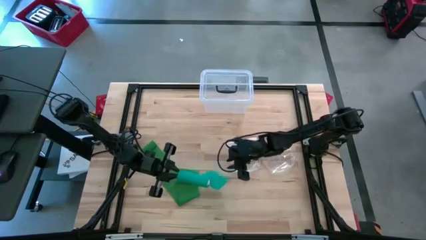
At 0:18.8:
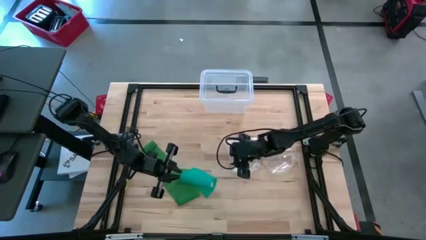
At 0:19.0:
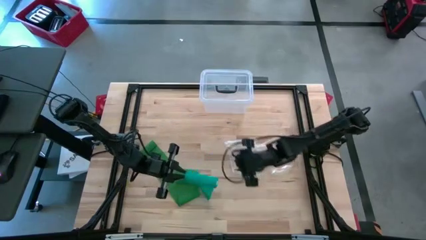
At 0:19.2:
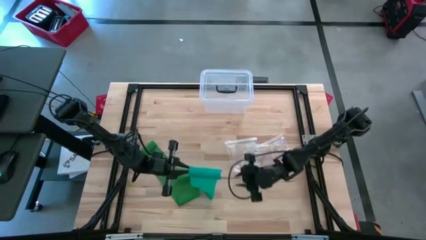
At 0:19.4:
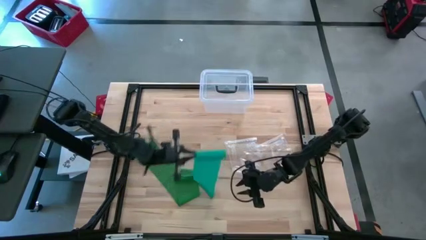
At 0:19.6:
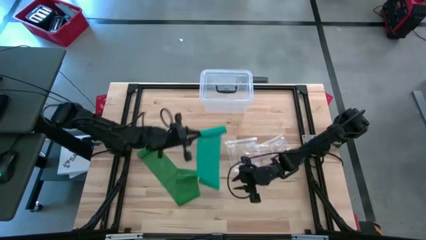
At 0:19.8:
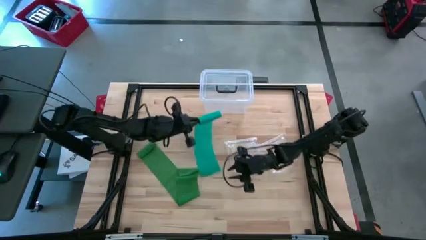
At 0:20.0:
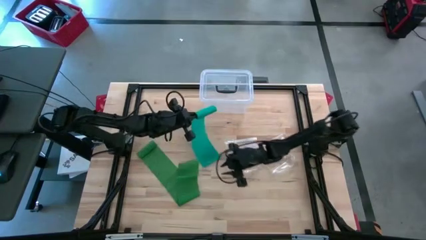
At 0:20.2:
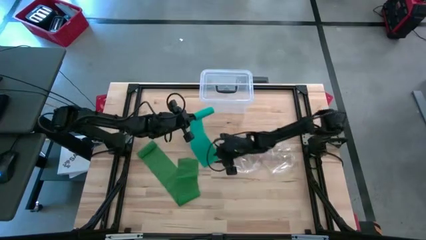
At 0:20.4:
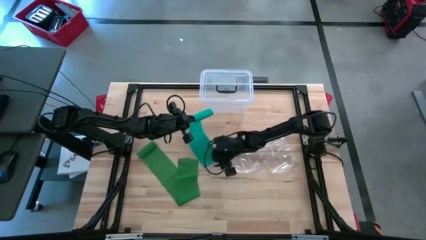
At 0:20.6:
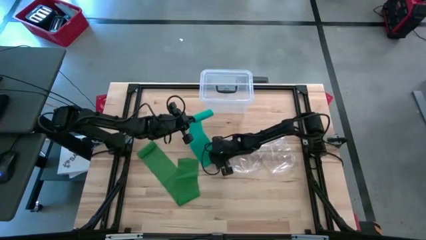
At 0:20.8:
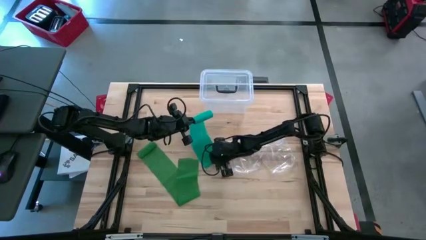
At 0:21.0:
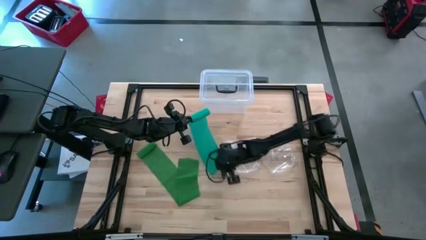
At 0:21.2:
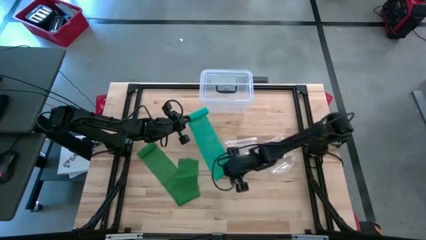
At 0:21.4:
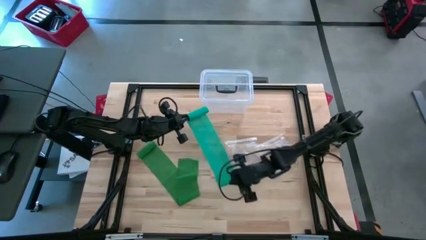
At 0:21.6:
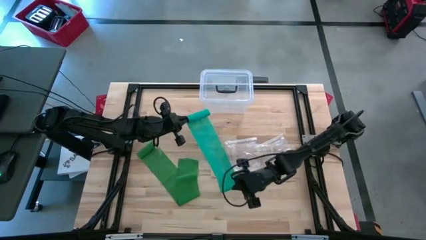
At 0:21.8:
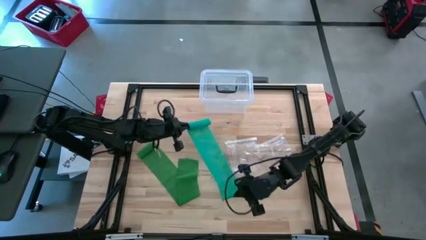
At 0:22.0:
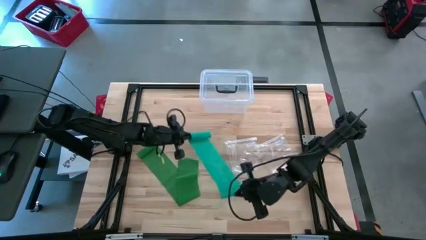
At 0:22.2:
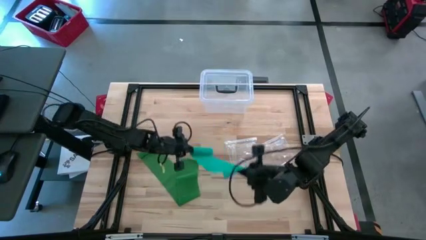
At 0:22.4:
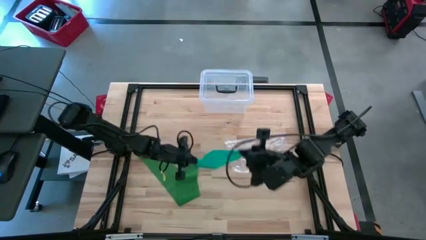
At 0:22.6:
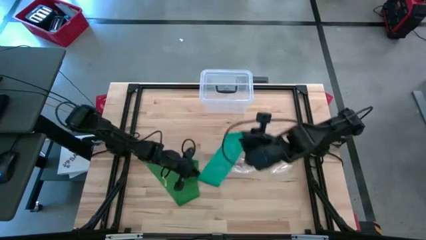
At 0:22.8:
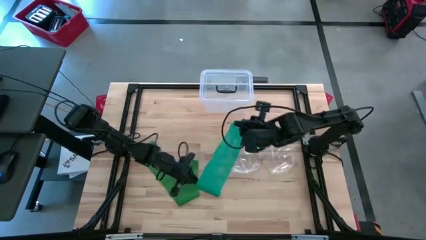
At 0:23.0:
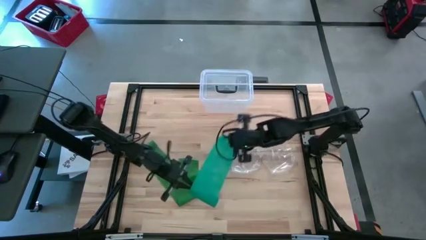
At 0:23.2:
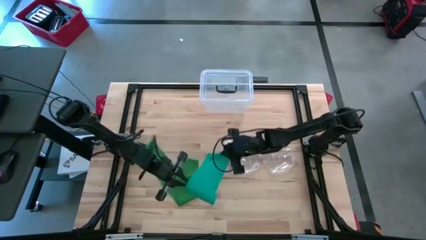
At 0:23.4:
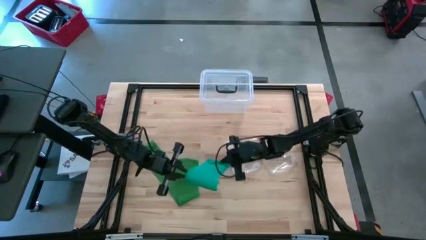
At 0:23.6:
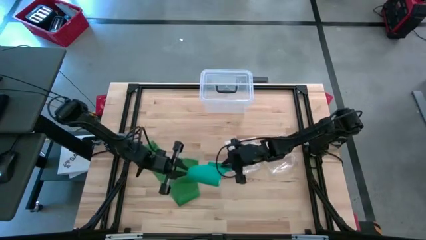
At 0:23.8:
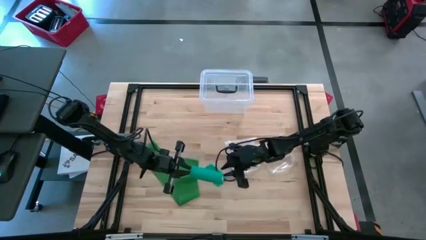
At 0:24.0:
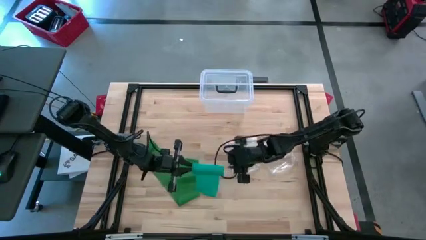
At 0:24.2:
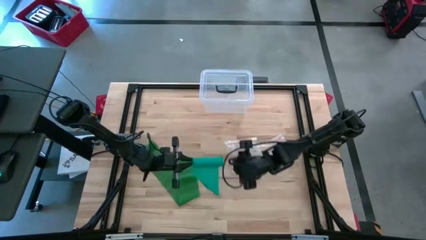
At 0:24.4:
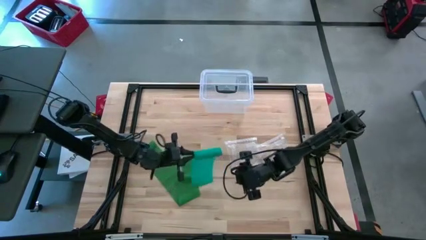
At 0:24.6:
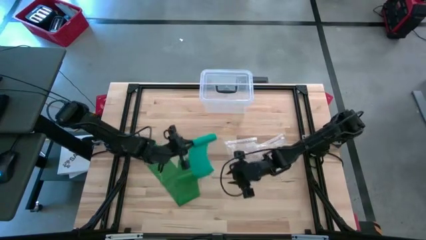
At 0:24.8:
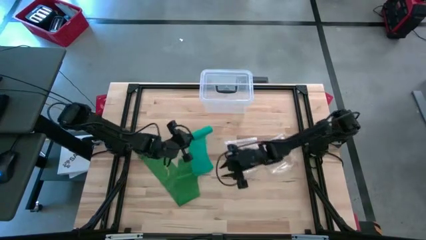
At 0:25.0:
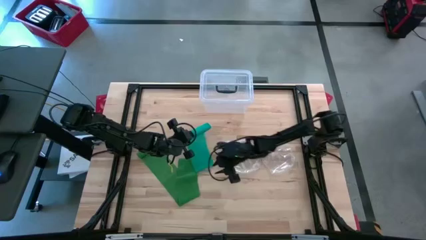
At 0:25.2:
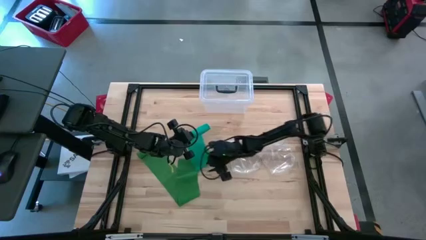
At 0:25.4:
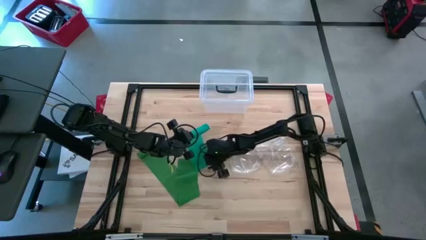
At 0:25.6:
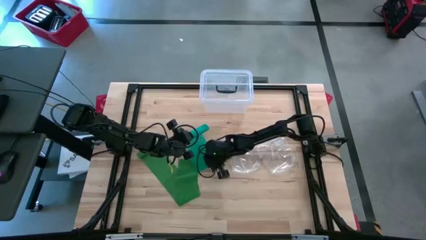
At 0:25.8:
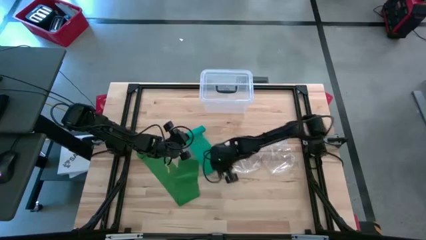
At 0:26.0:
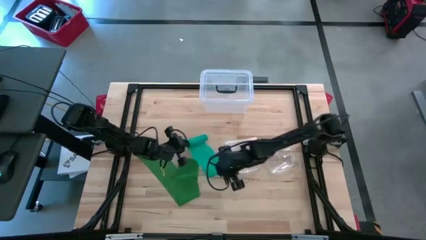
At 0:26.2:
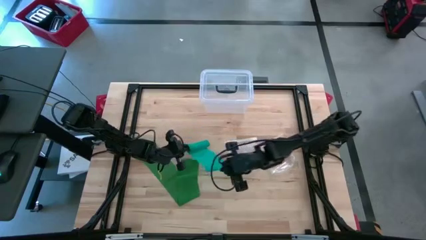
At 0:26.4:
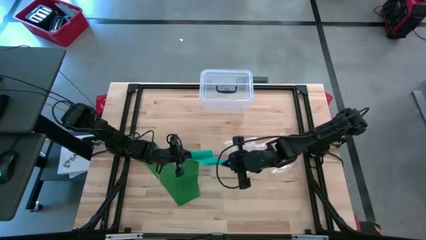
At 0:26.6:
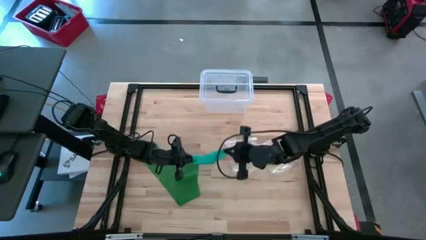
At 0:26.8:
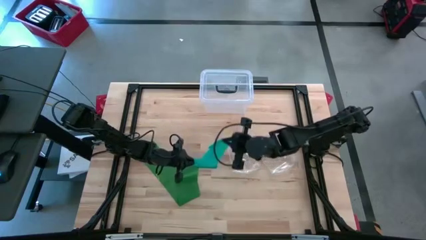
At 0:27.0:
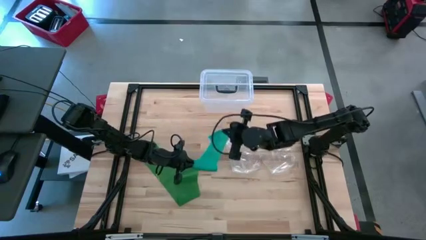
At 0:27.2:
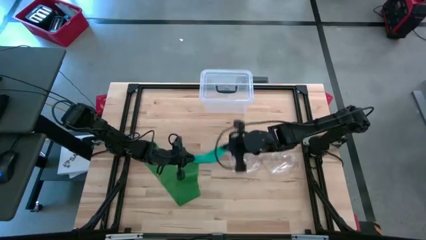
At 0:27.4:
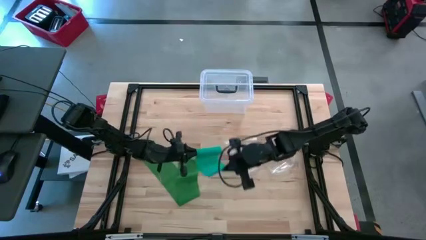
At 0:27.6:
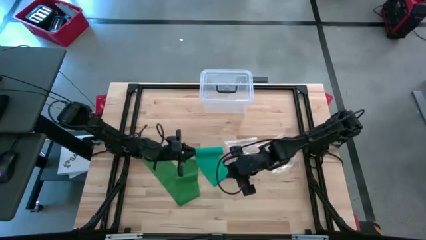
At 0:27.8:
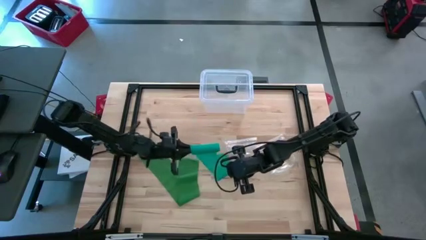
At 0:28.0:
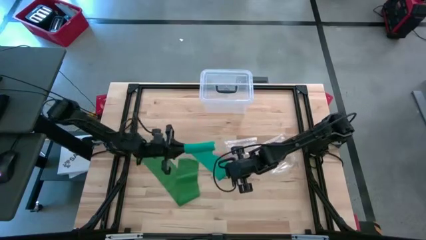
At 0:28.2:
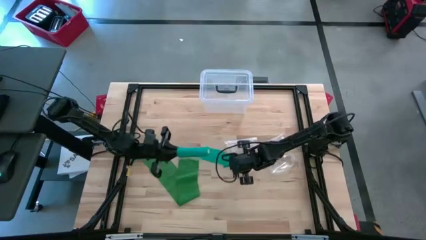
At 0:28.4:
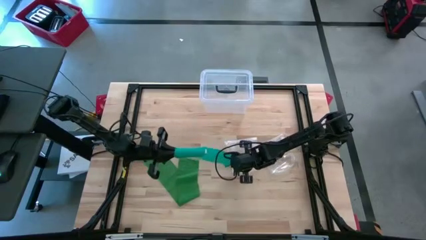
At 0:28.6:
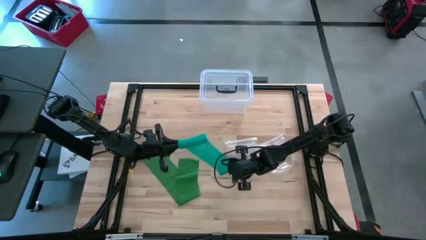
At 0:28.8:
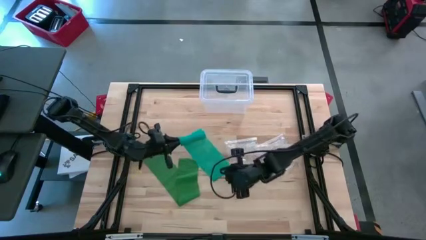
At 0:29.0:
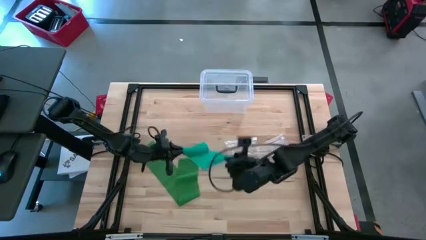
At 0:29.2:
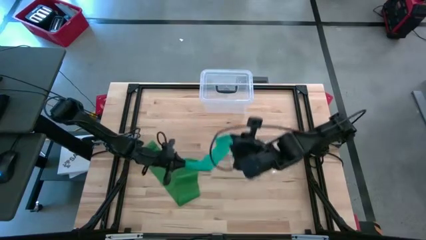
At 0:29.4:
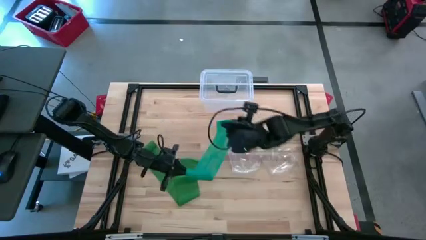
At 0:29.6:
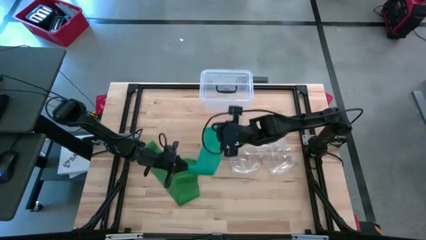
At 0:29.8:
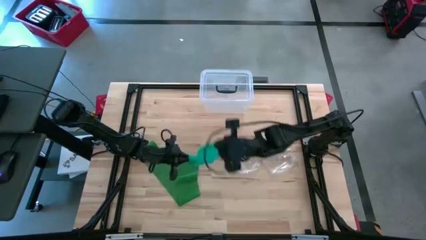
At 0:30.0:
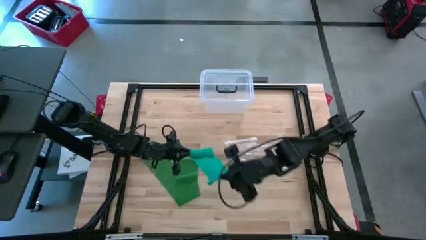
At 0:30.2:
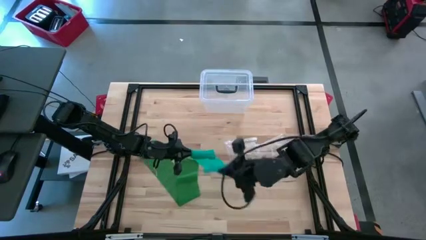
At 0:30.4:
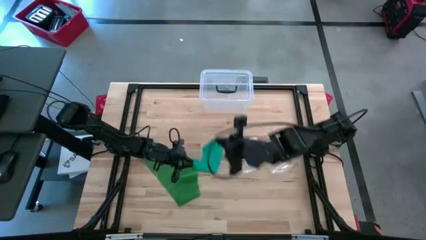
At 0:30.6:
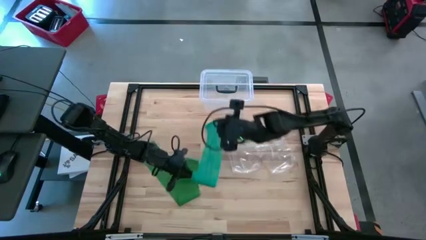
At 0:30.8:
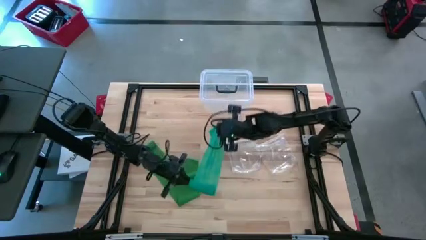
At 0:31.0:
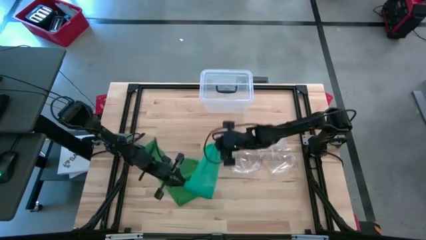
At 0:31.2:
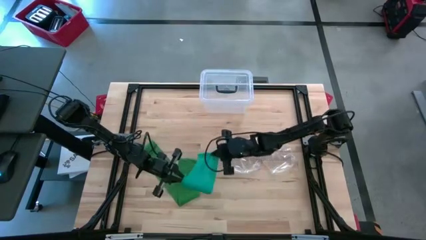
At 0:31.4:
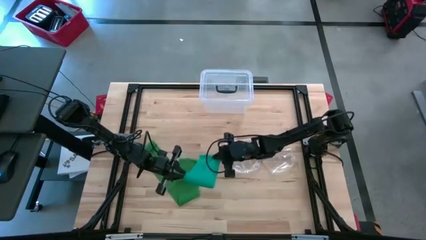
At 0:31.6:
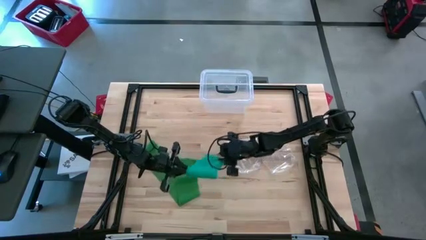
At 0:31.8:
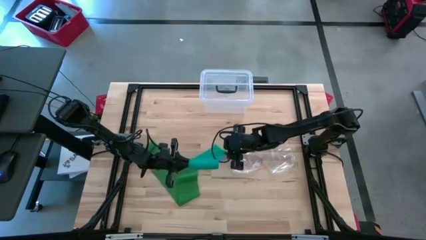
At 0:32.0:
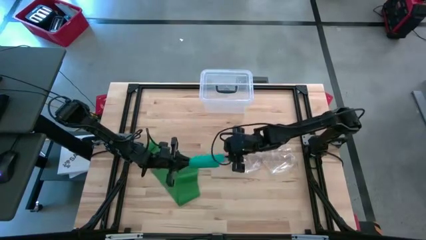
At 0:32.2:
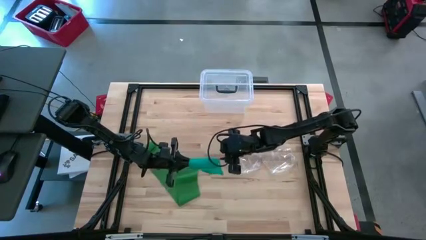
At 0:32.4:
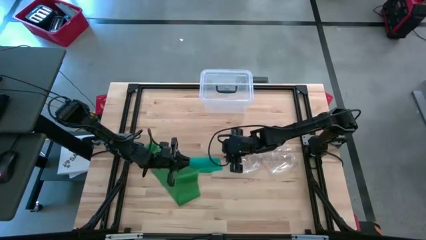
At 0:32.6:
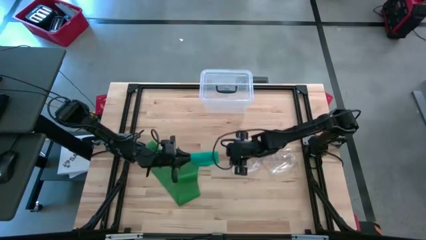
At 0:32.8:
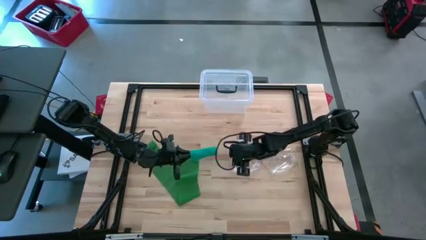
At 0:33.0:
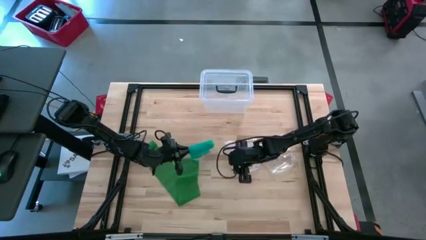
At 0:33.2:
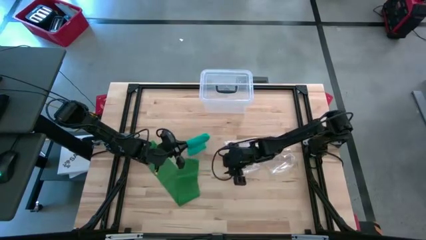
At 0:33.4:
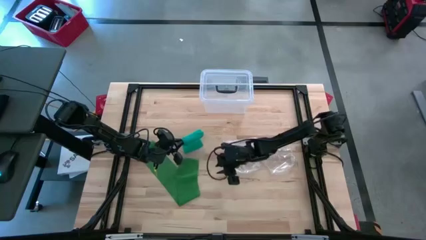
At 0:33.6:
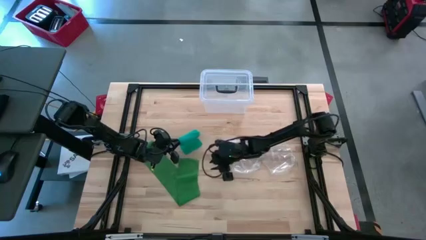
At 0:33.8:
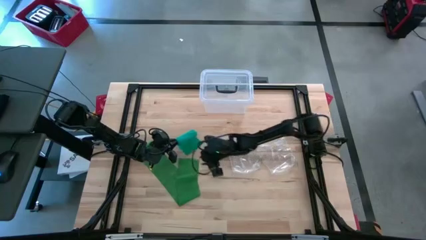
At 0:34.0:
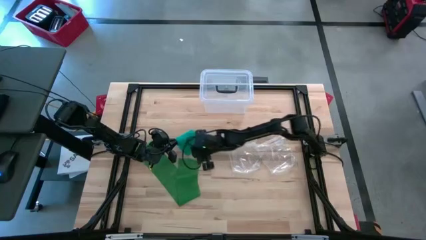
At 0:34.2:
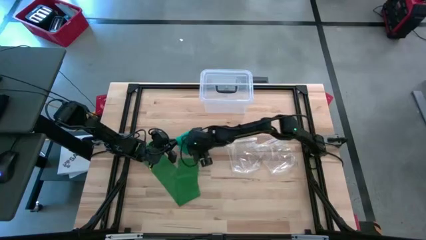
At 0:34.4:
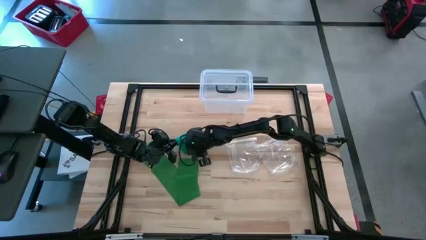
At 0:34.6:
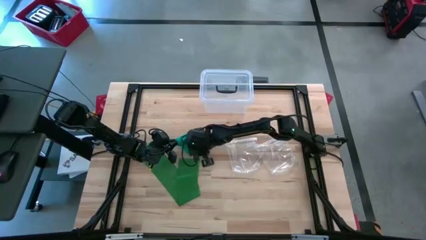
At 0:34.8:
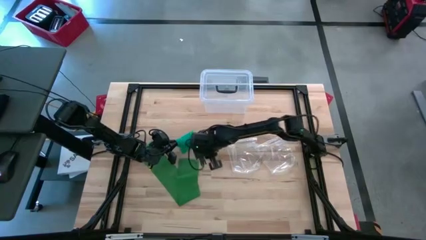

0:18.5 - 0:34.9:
Task: Roll bandage
Roll the blue bandage
